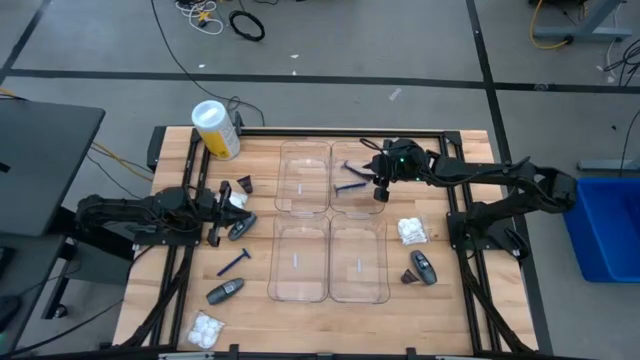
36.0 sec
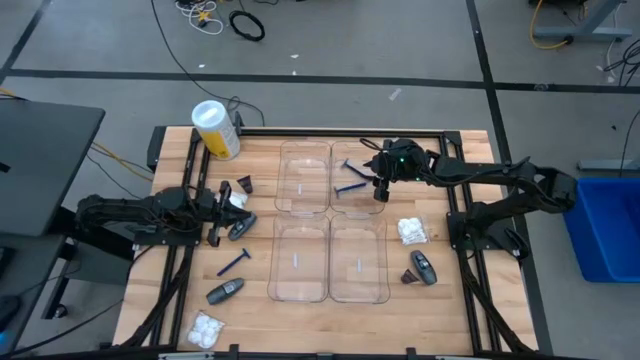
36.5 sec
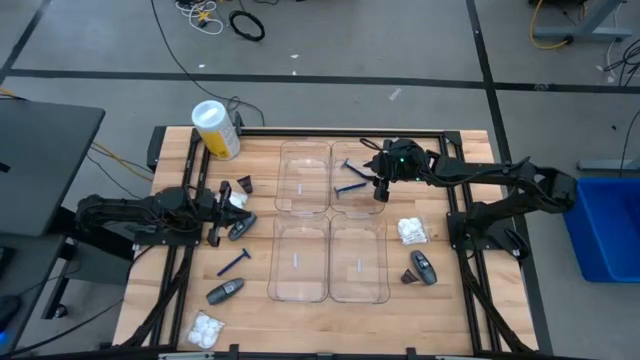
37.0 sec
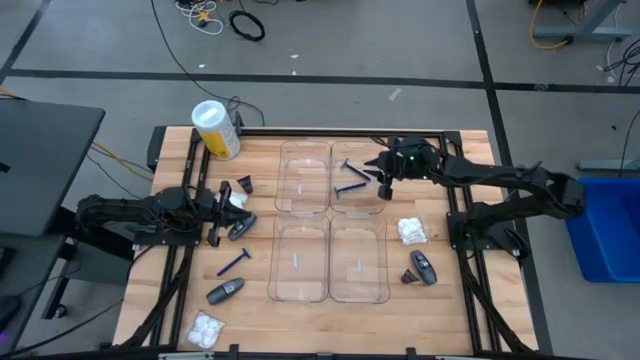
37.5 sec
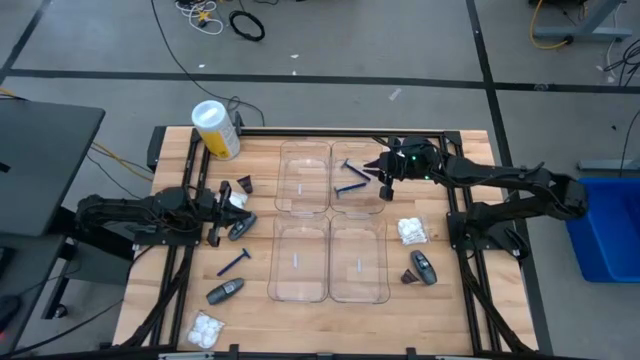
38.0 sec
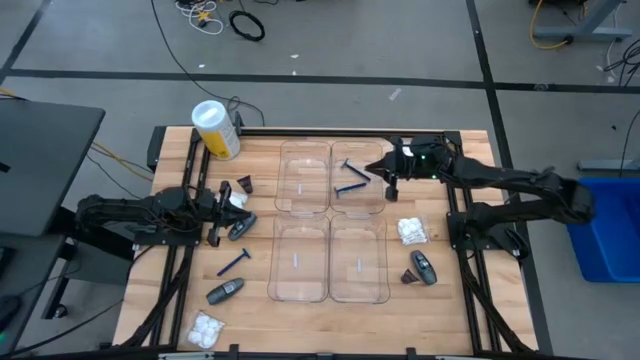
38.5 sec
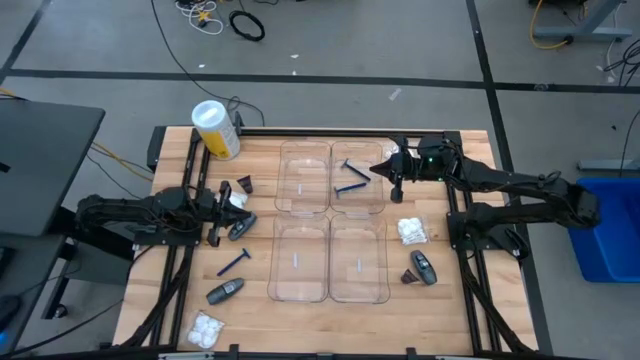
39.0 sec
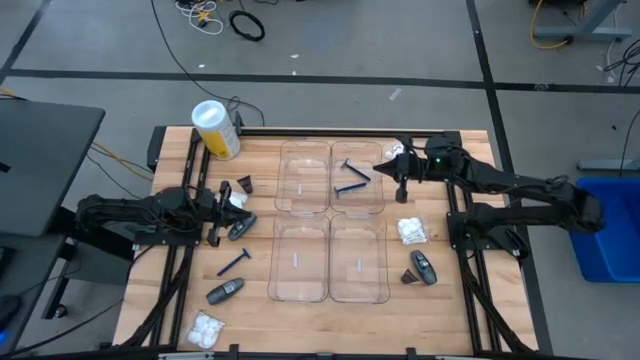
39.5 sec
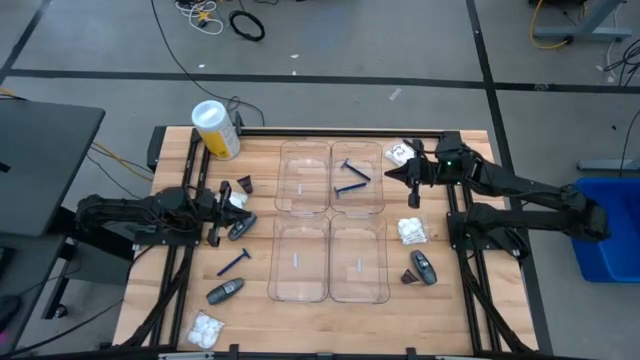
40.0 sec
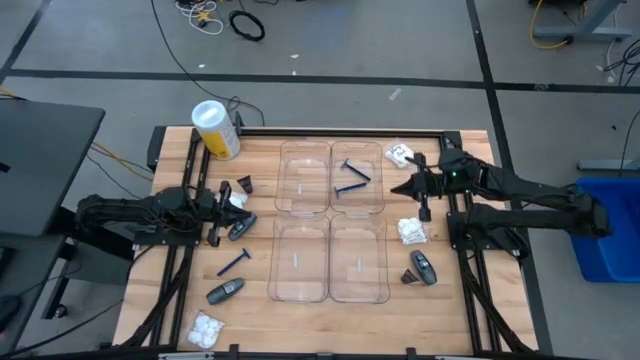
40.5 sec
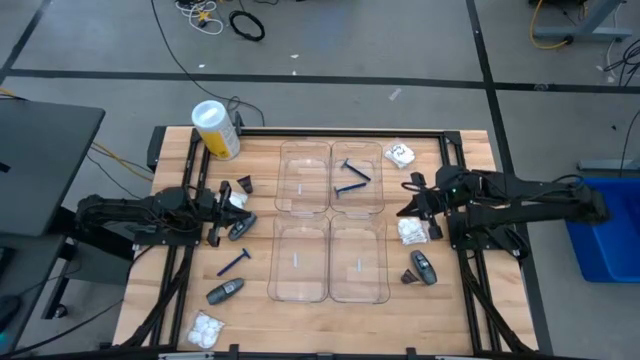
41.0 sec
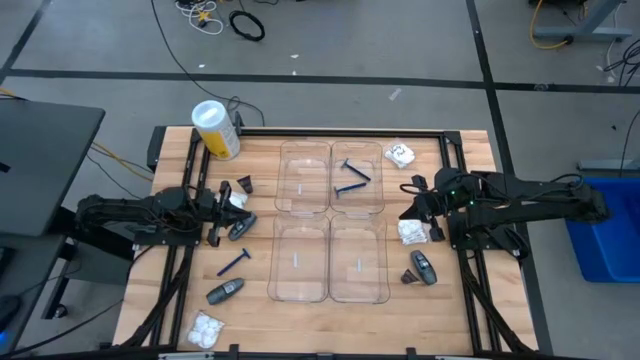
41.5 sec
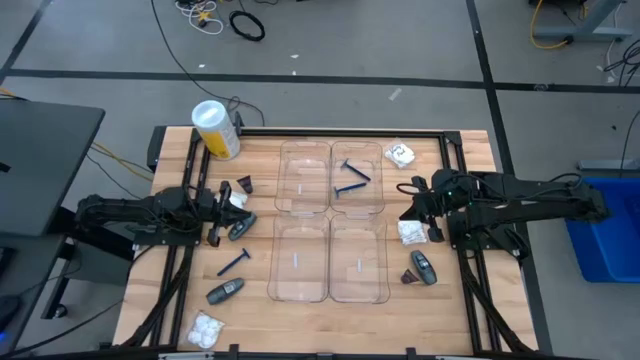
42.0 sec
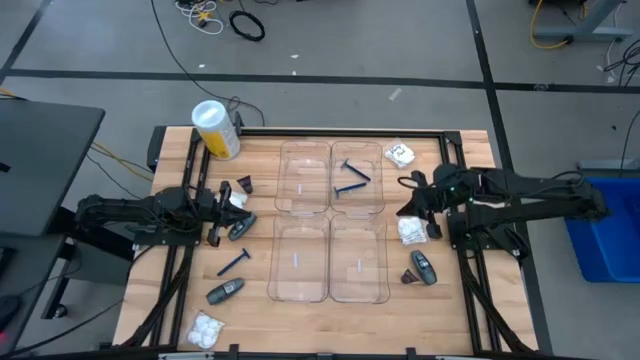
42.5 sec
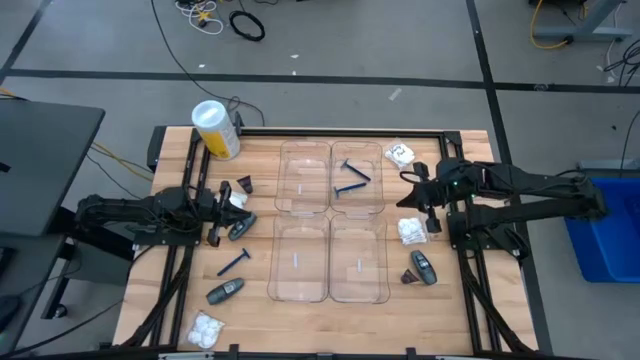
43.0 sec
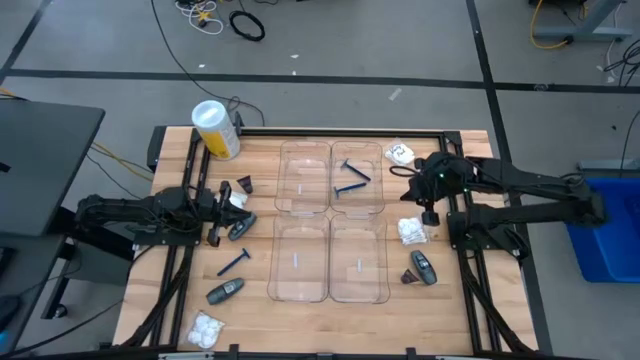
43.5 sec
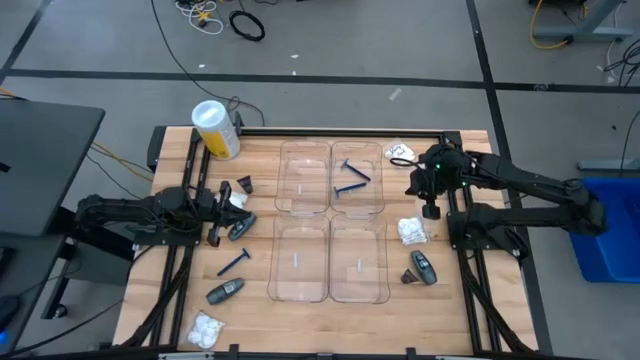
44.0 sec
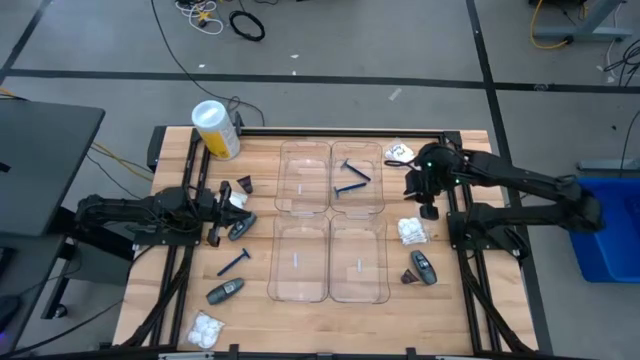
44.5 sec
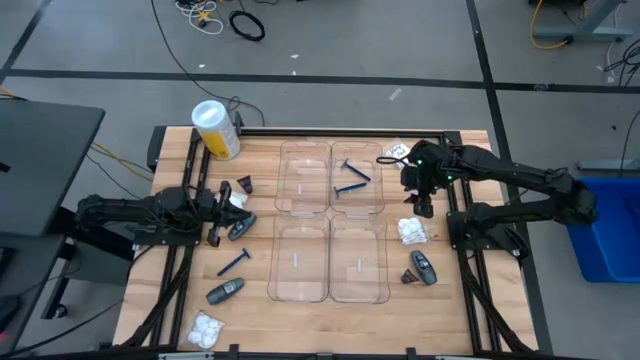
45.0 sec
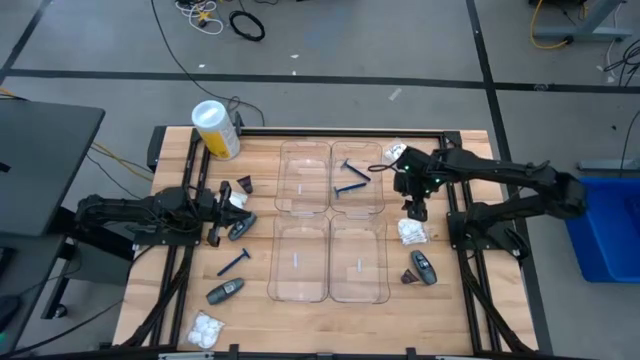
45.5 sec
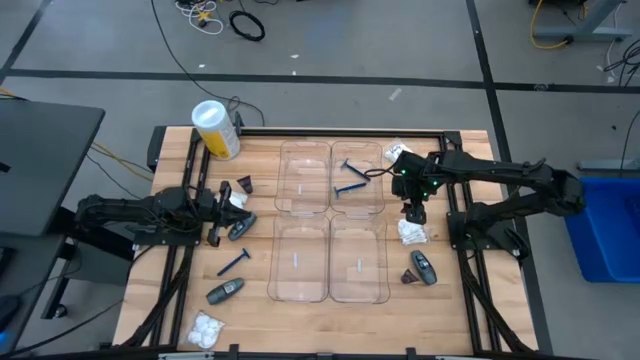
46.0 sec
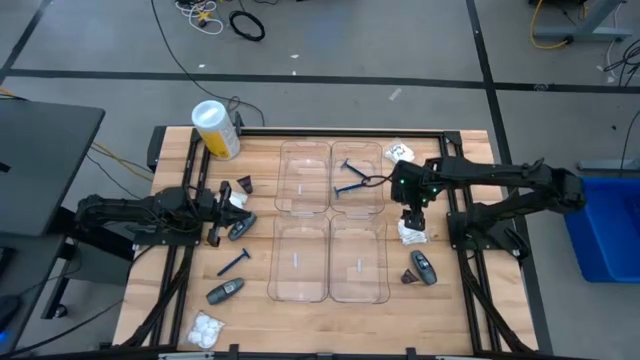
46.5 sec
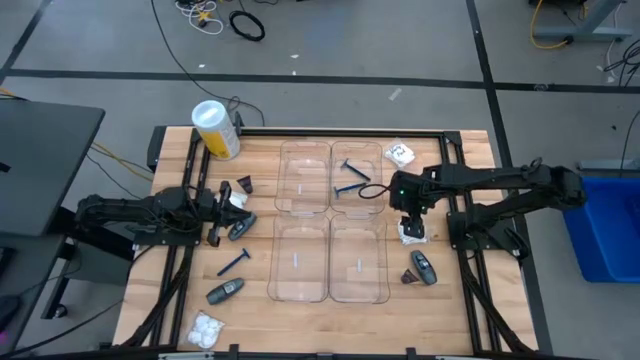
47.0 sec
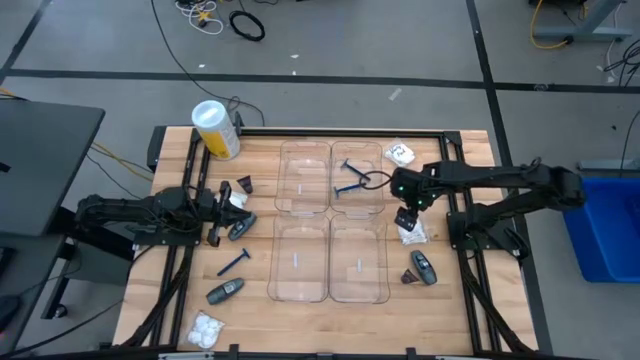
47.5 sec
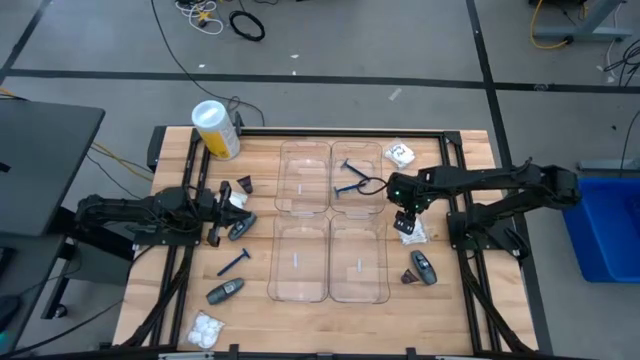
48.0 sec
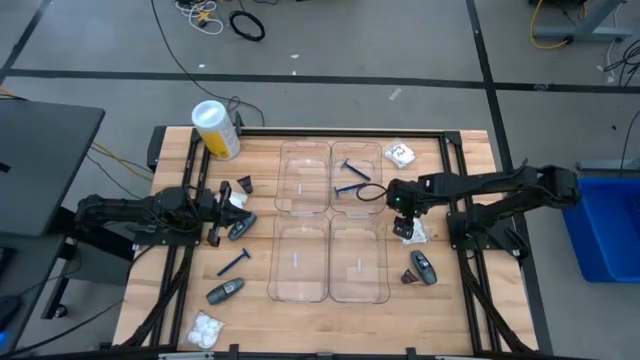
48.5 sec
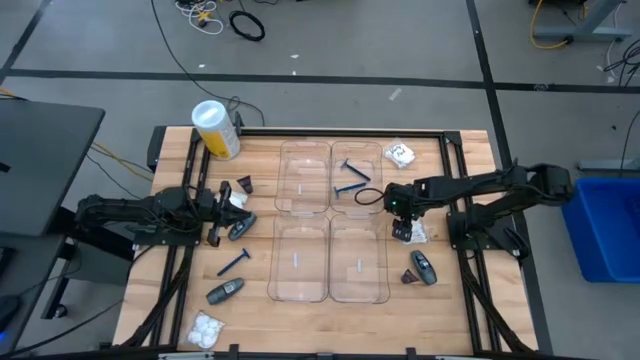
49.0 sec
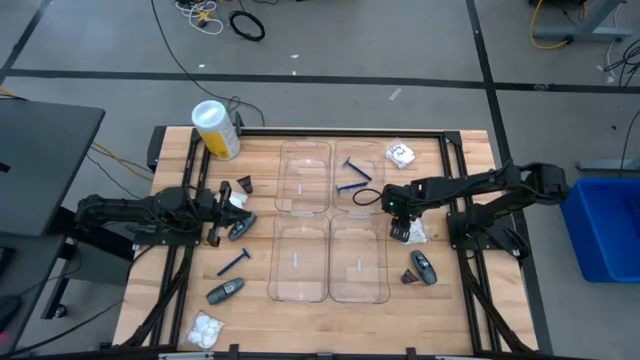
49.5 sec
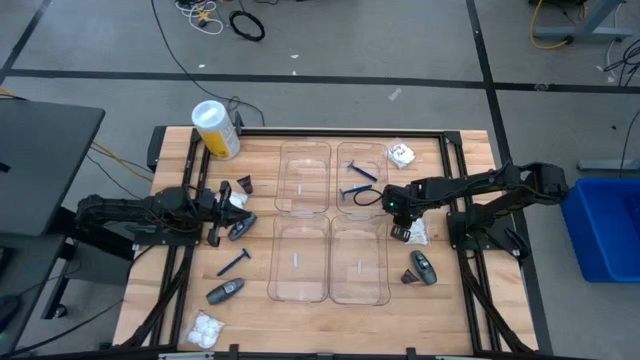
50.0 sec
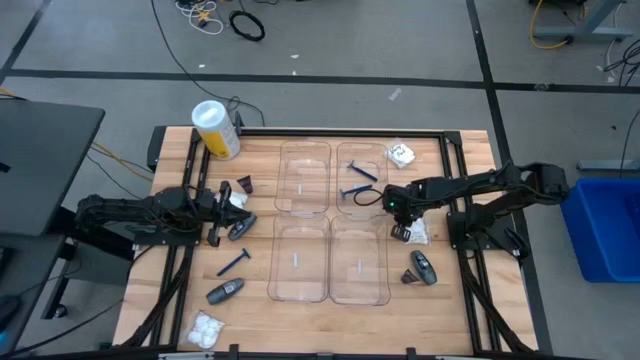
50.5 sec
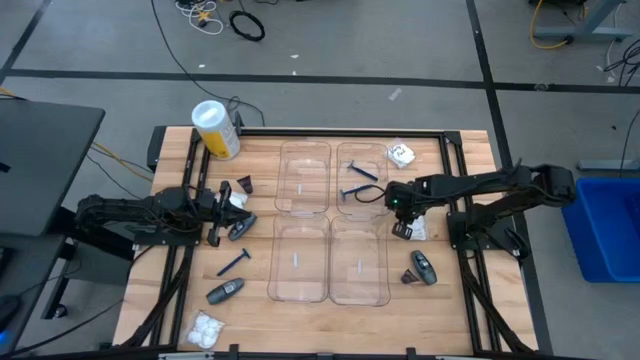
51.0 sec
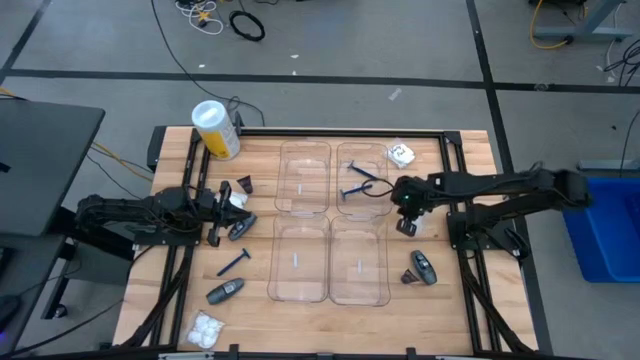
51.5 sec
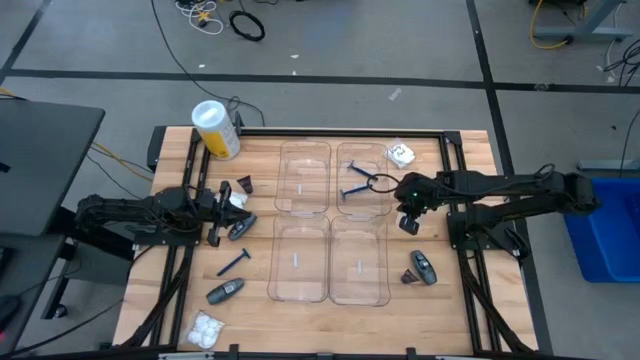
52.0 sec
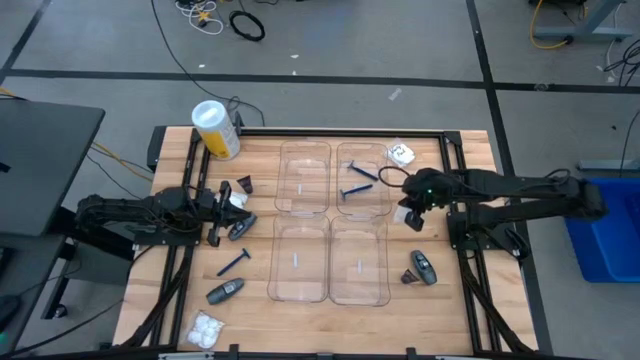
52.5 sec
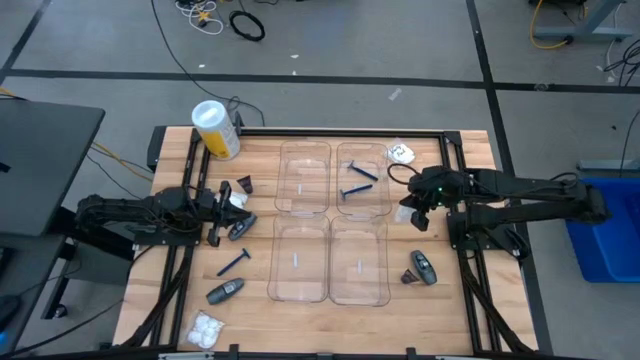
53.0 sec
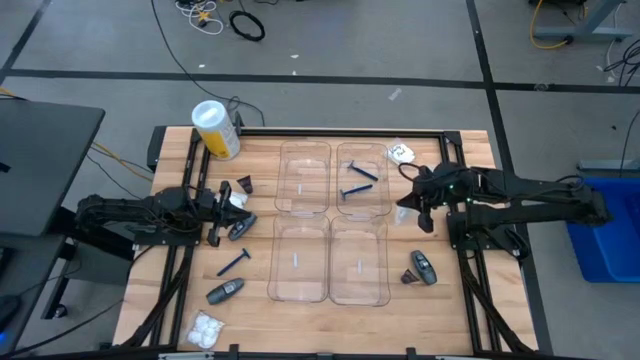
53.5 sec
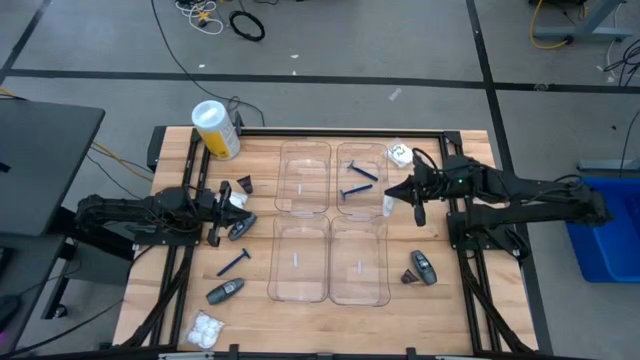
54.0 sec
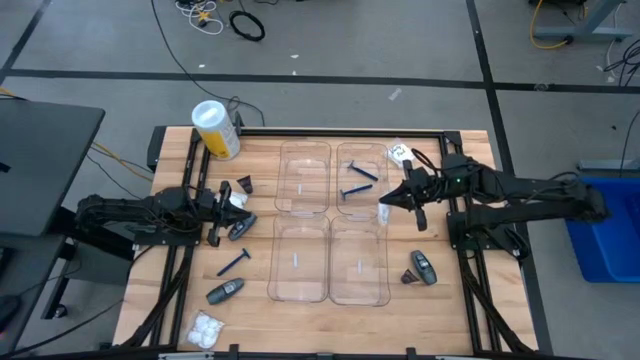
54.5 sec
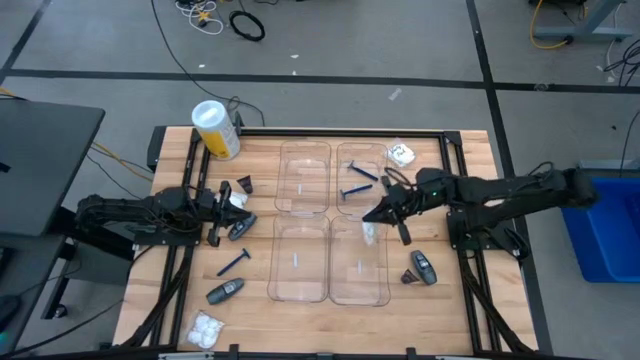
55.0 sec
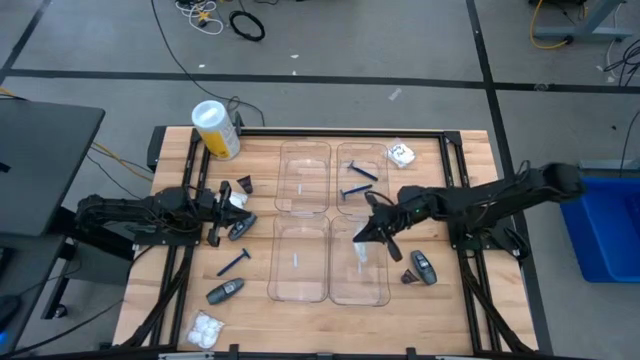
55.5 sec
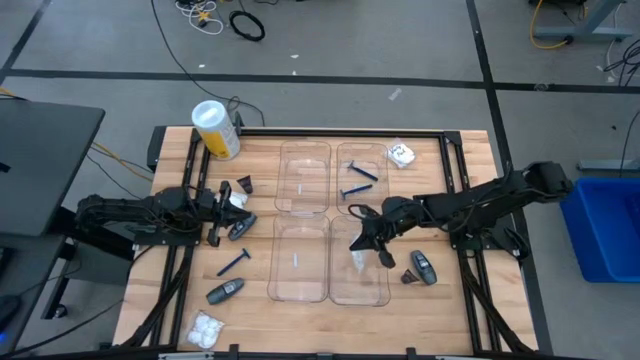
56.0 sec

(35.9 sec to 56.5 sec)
Task: Pick & Place Travel size toiletries
Put the cotton pack into the bottom right transparent bin
